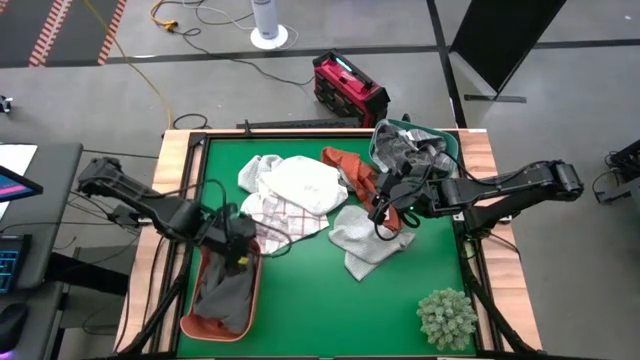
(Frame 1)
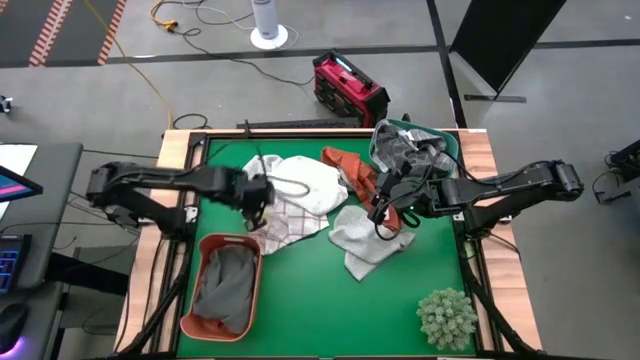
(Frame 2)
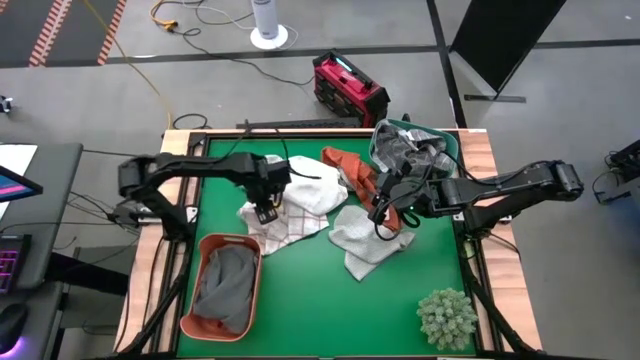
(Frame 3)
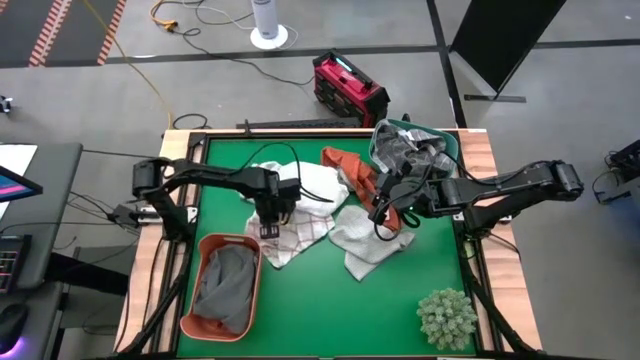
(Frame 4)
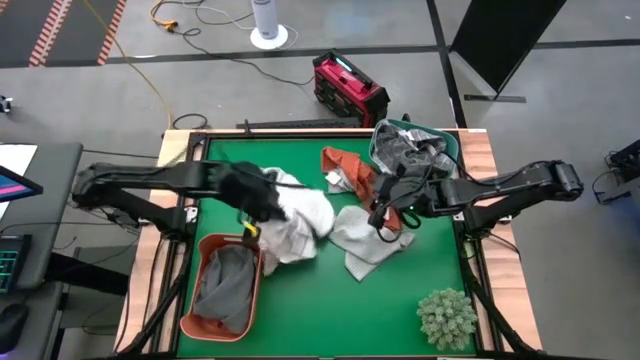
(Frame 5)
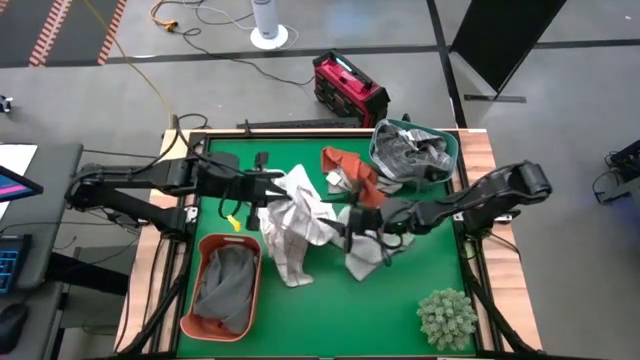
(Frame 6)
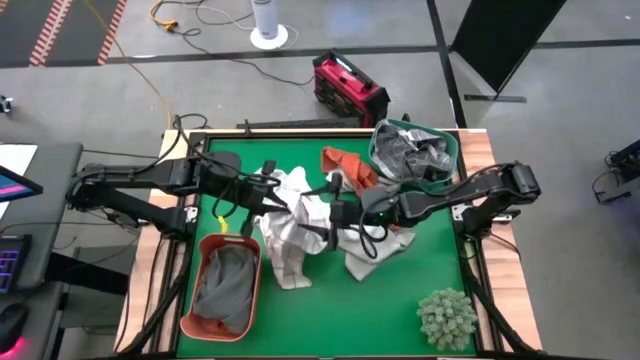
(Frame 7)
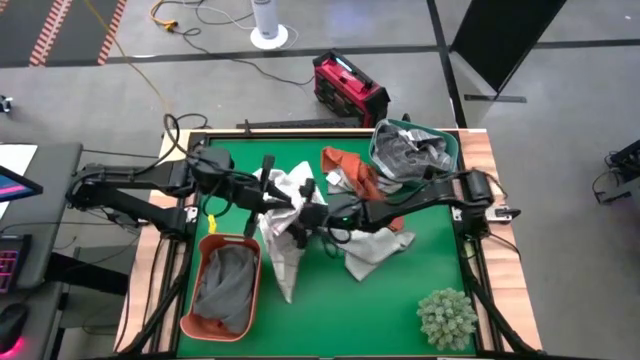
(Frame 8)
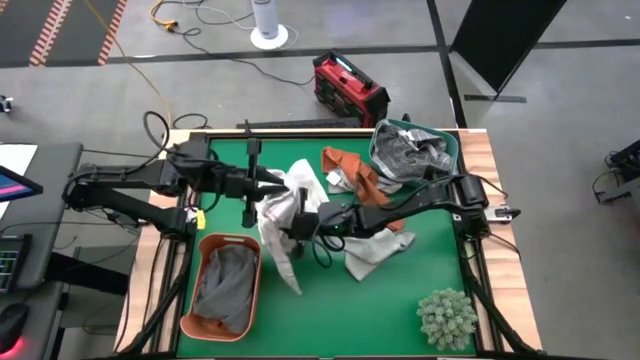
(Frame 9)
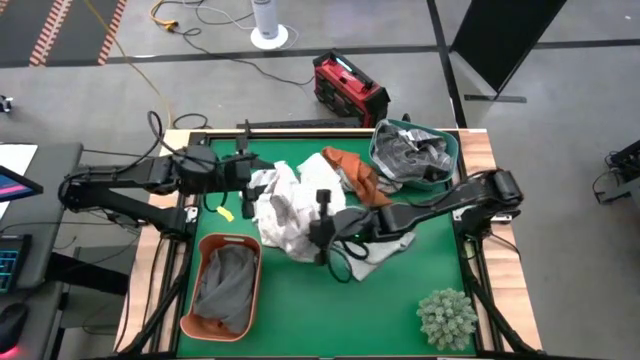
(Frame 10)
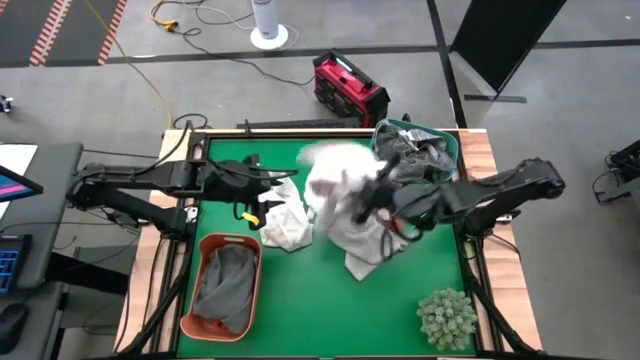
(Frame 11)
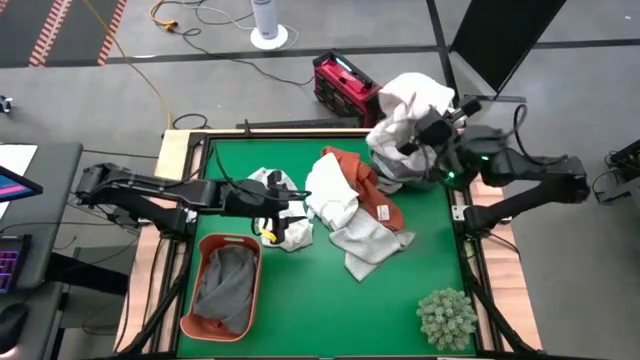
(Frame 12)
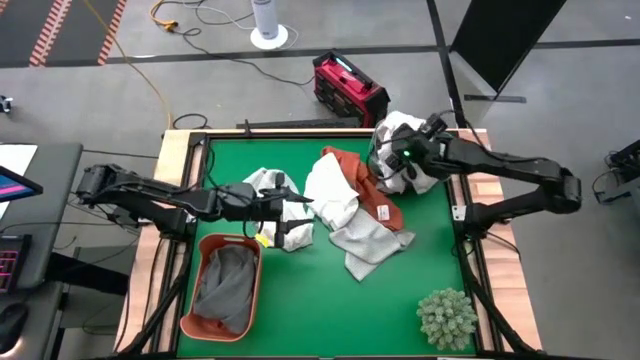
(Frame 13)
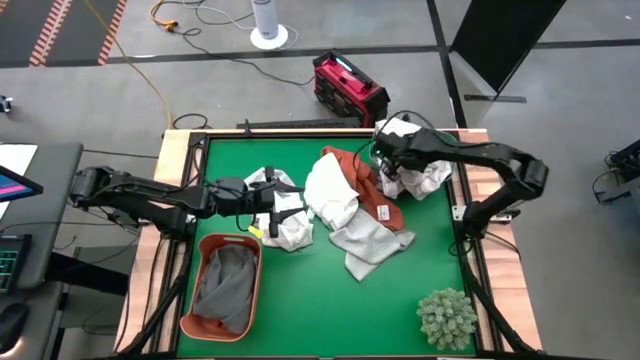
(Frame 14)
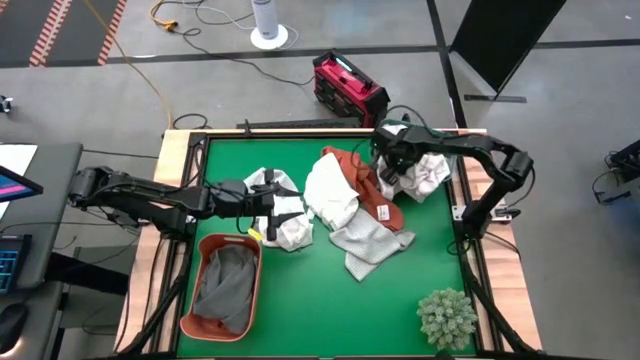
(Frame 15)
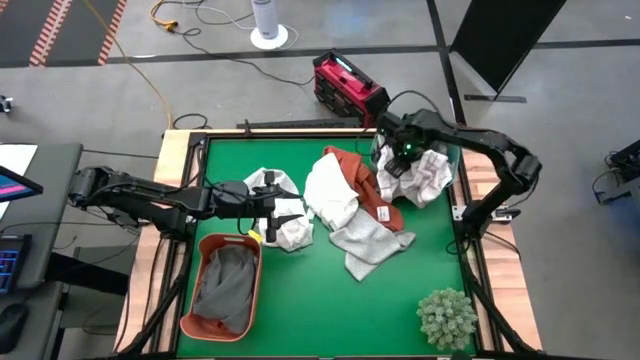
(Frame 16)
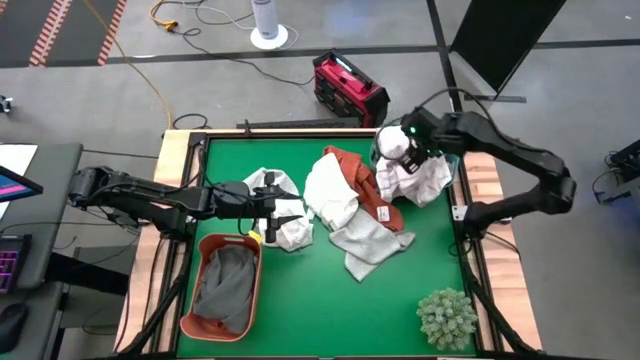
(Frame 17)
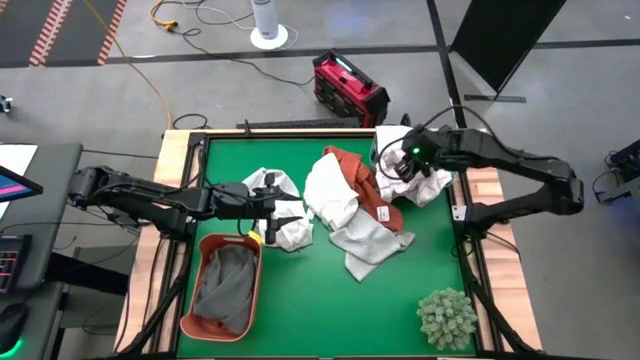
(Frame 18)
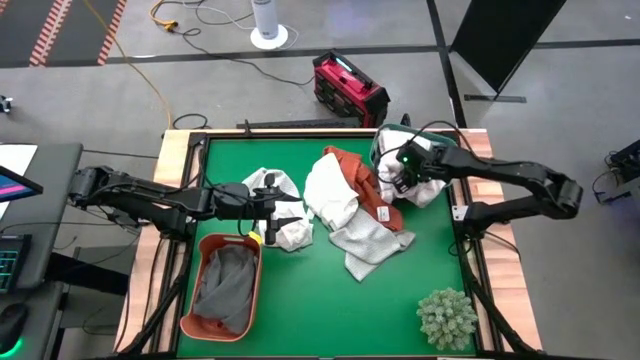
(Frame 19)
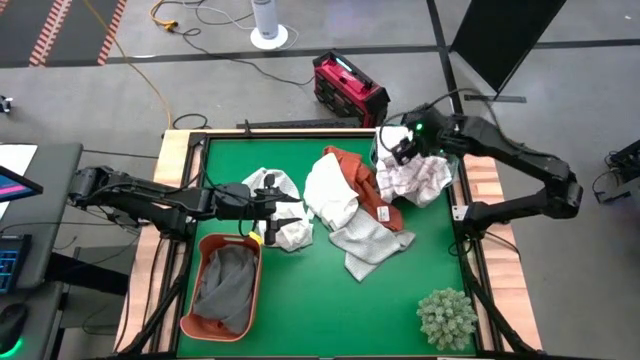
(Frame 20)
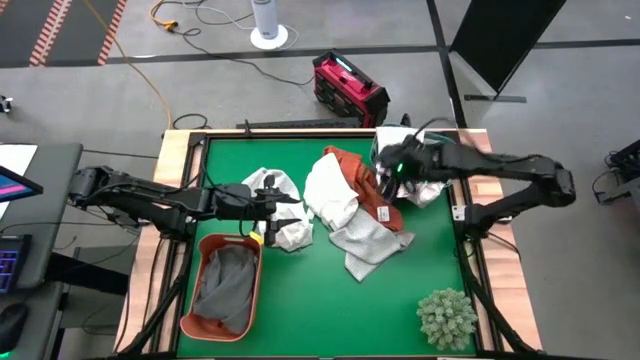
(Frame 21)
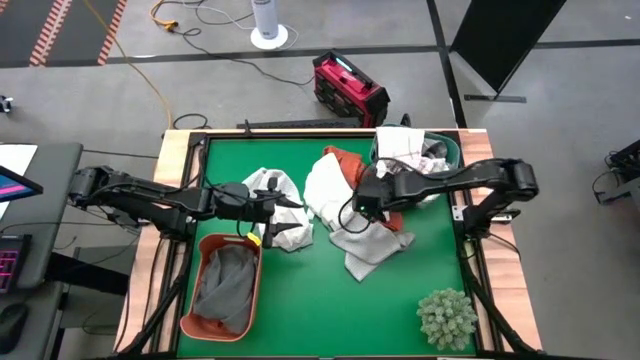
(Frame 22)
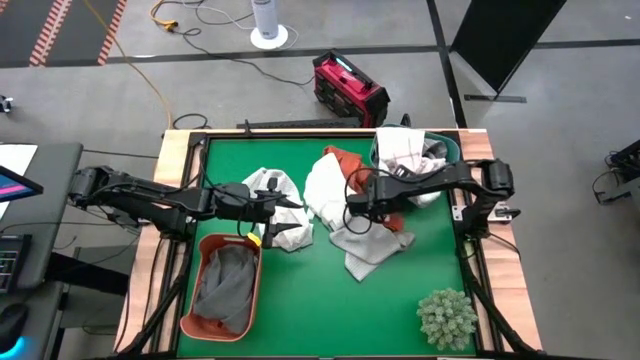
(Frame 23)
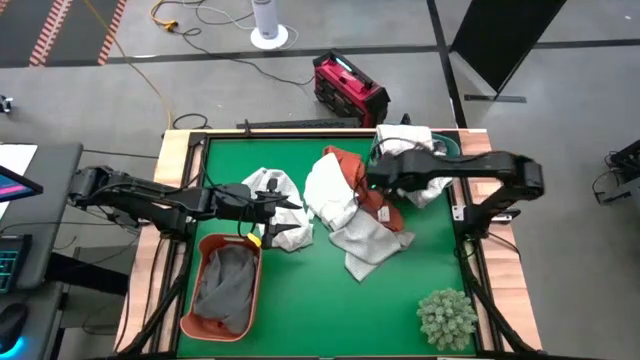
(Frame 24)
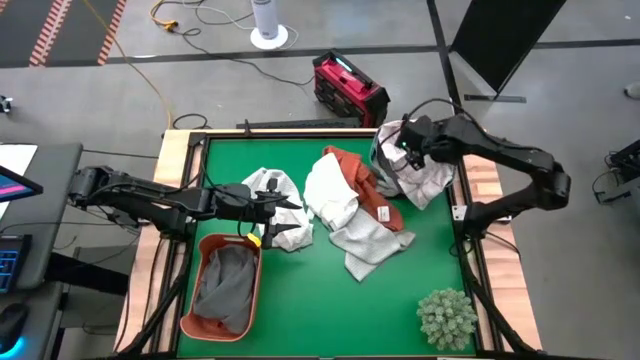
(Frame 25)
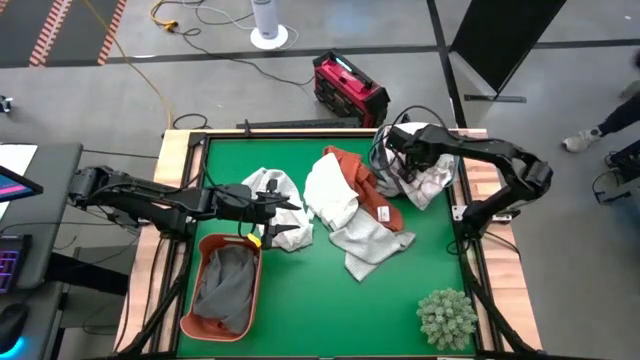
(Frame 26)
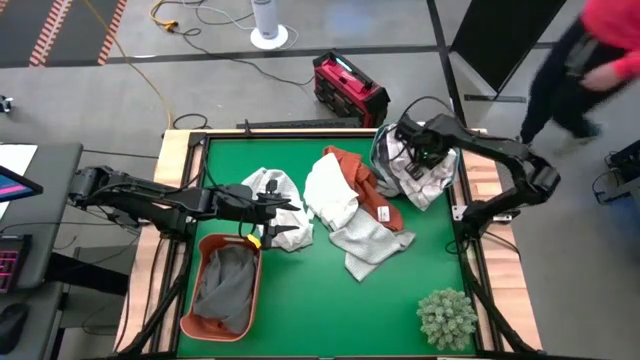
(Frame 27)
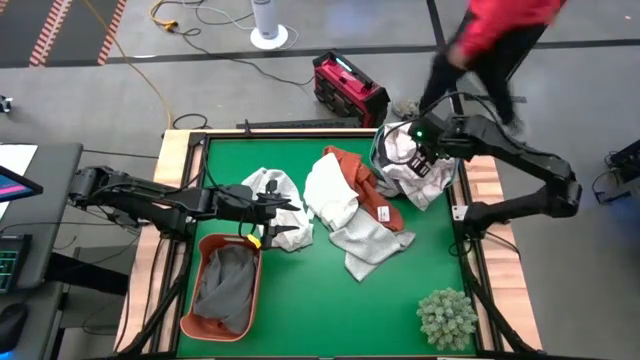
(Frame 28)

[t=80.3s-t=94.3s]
Task: Sort towels by color in basket
Put the white patterned towel into the green bin

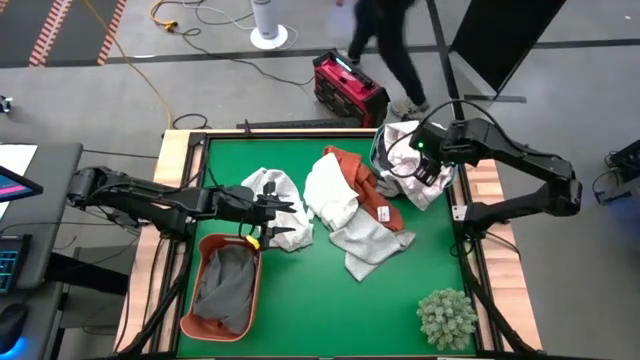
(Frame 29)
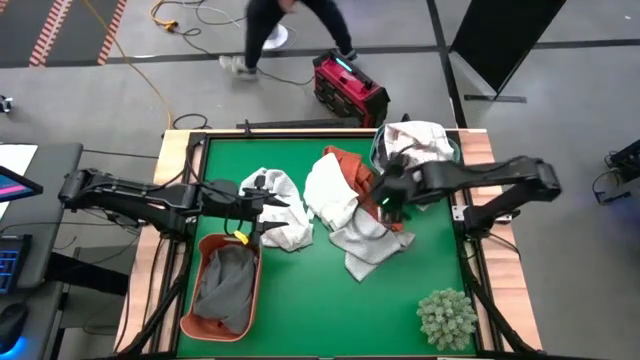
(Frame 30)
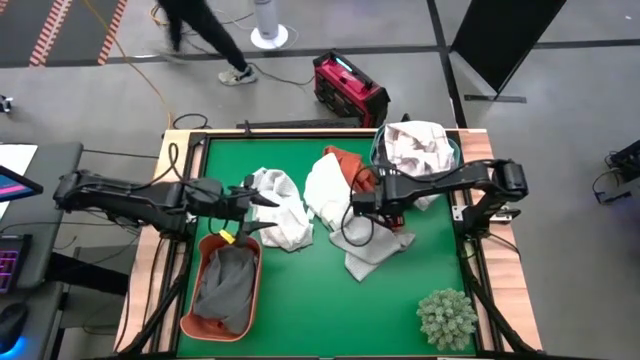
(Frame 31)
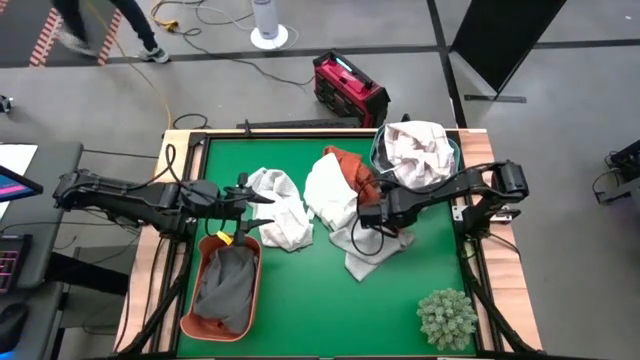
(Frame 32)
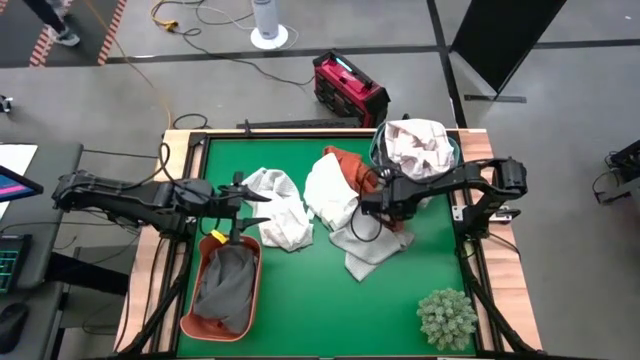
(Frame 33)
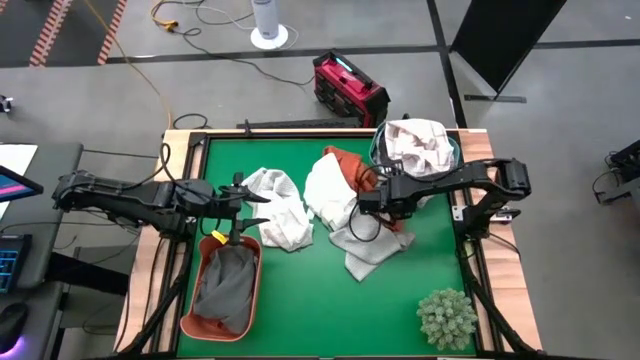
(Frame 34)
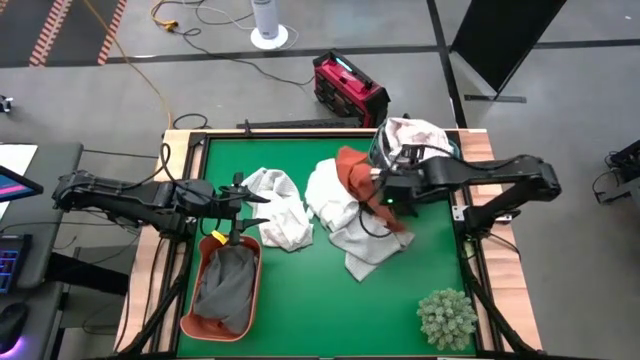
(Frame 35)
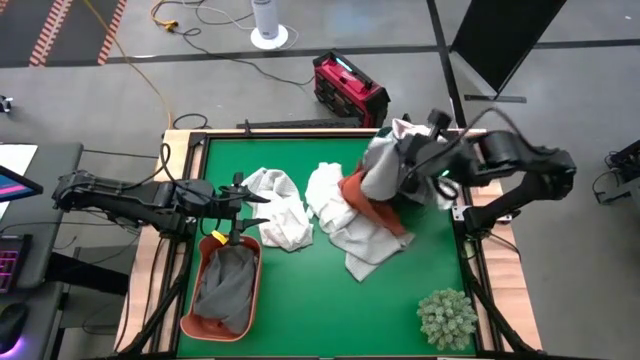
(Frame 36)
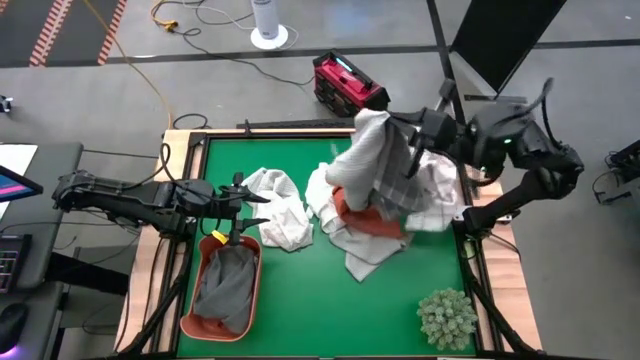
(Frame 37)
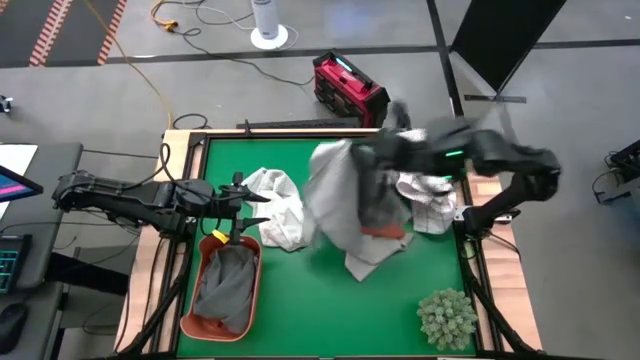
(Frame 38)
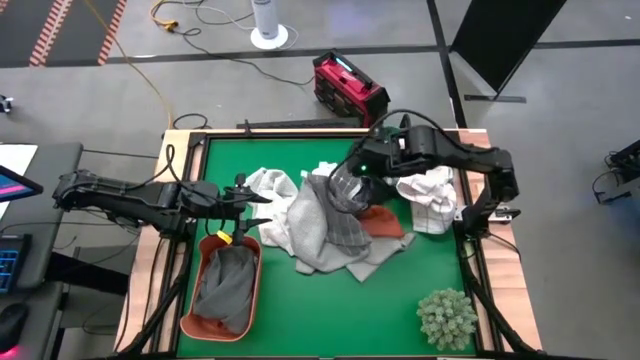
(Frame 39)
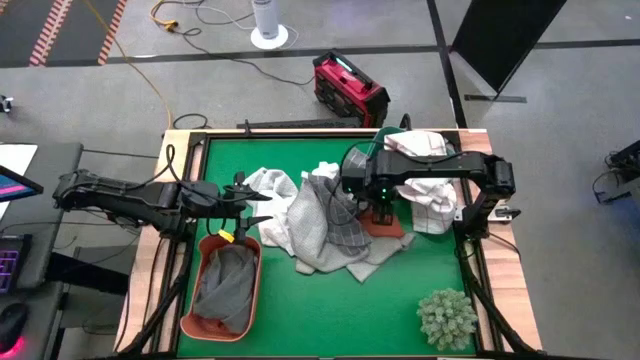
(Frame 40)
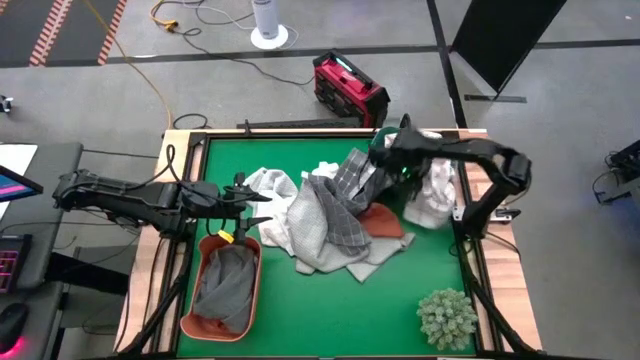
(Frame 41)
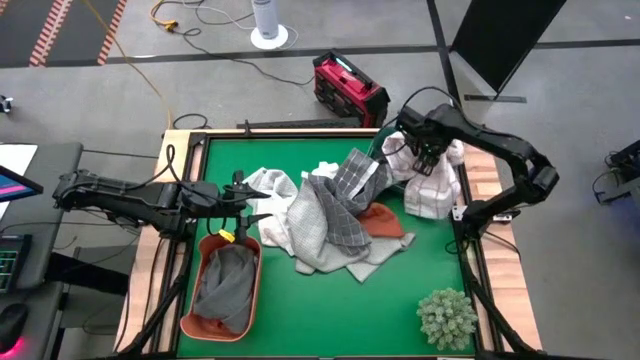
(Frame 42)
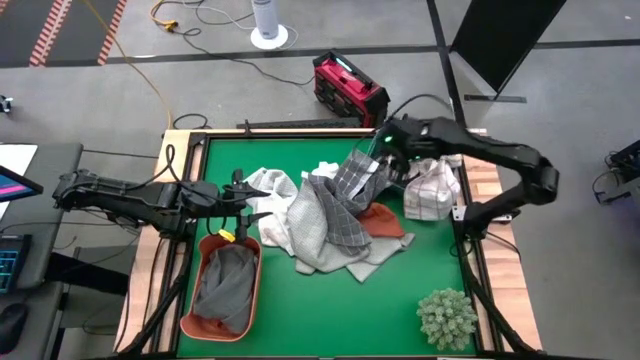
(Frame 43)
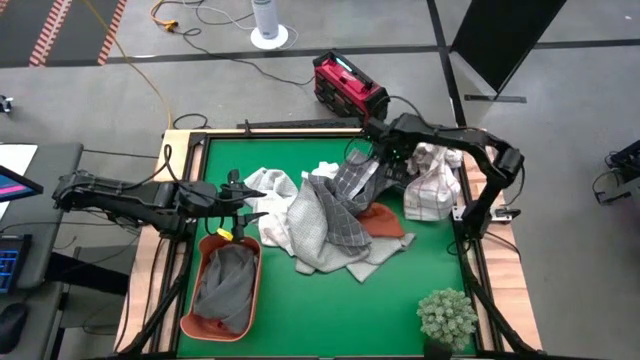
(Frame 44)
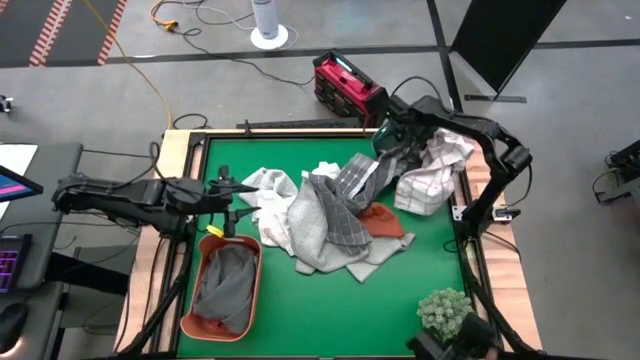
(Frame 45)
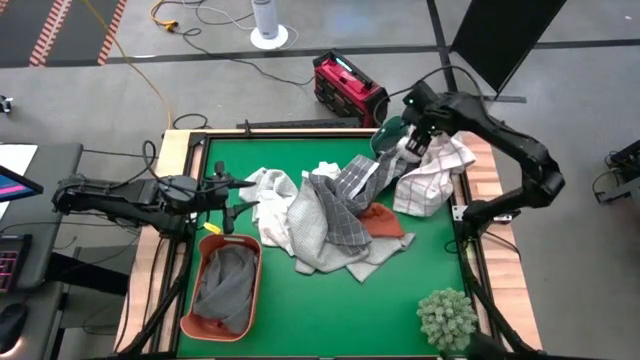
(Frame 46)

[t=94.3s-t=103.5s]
Remove the gray patterned towel from the green bin
